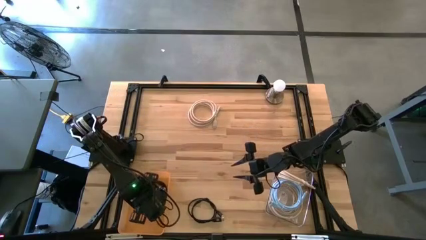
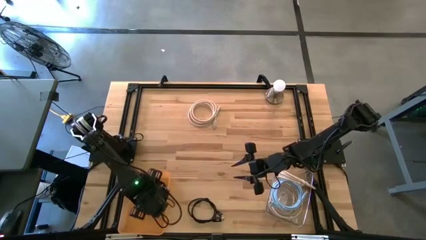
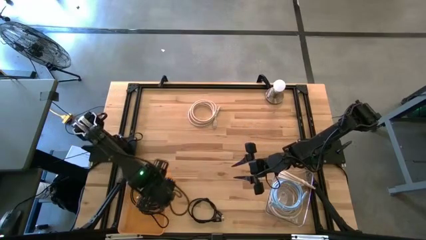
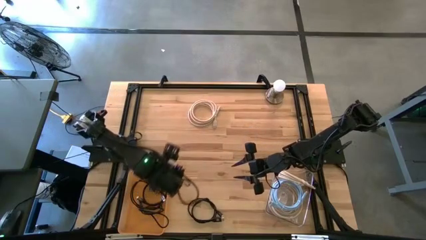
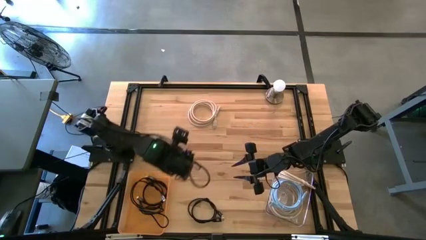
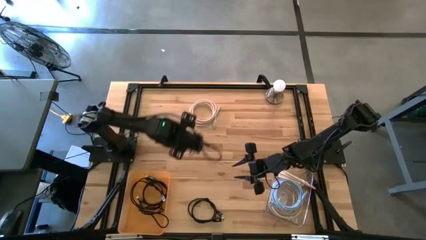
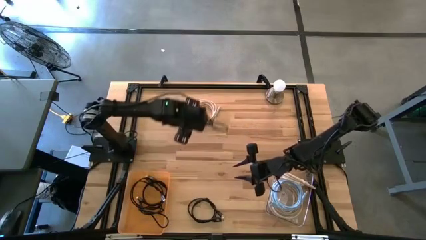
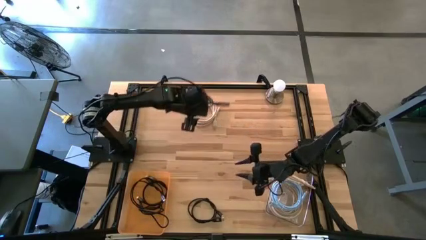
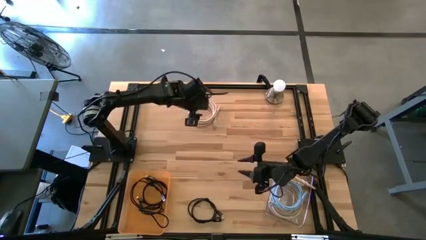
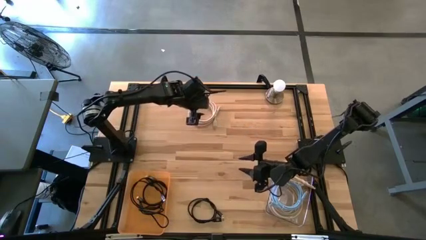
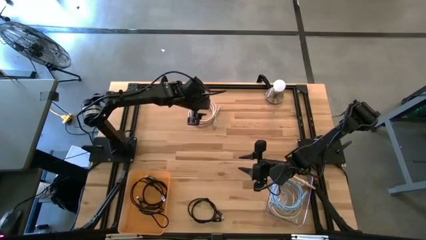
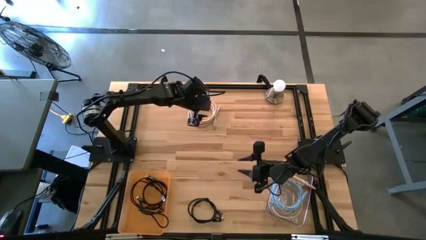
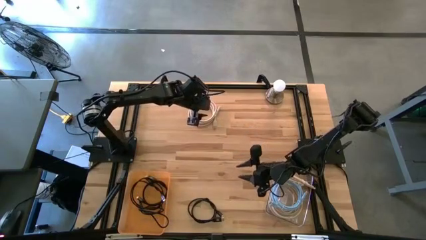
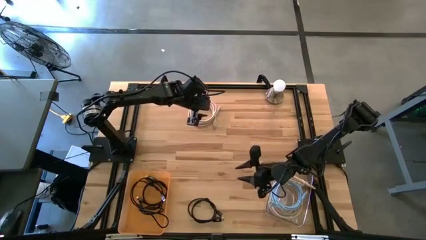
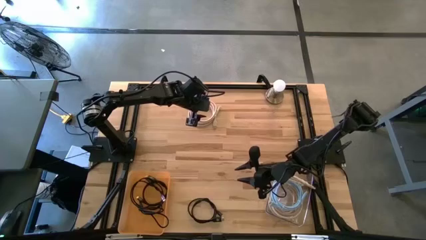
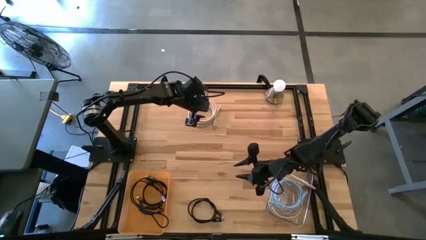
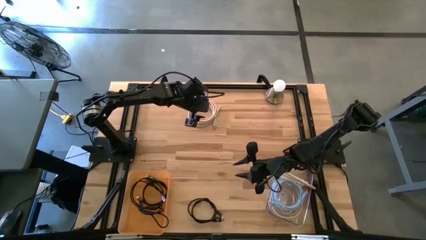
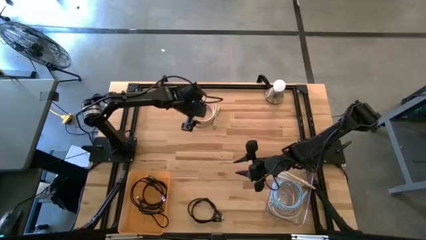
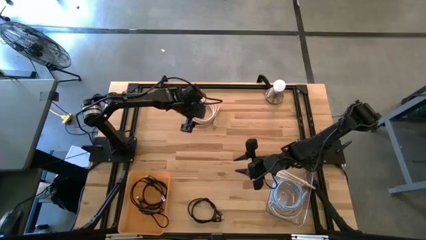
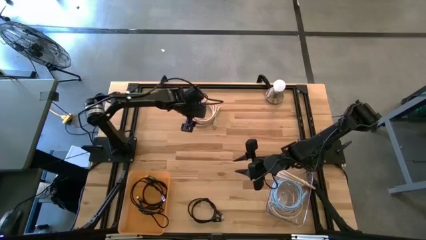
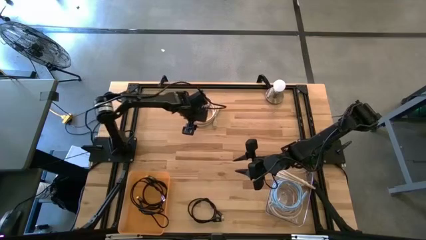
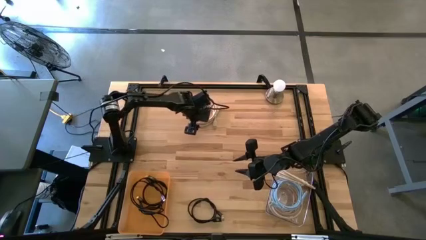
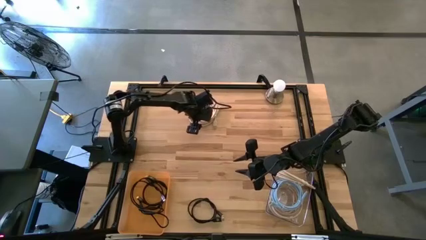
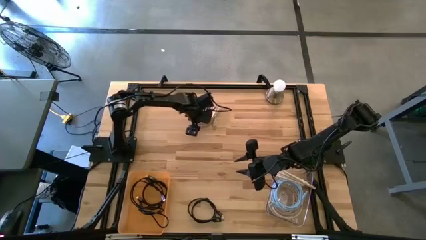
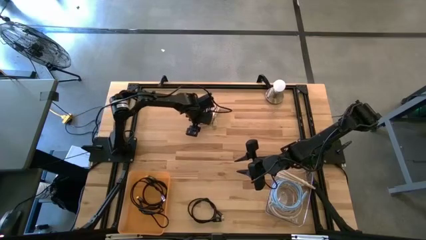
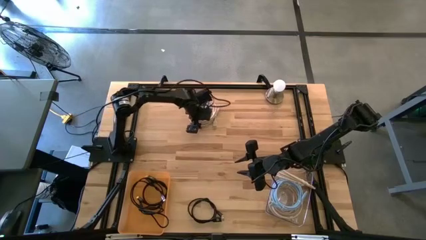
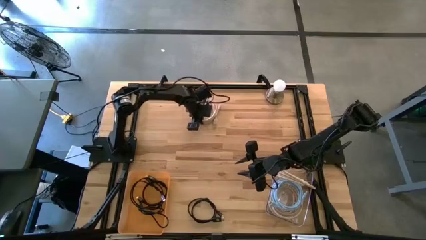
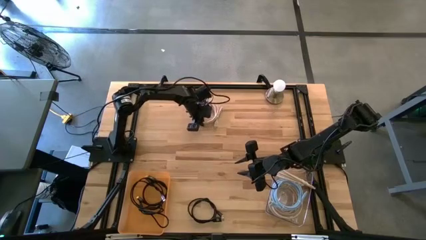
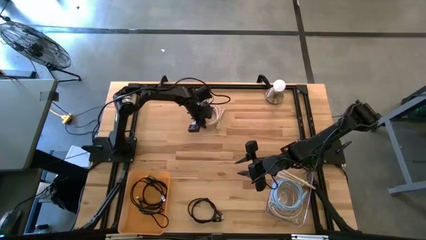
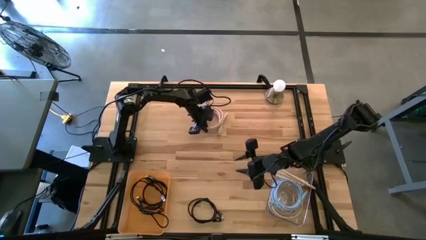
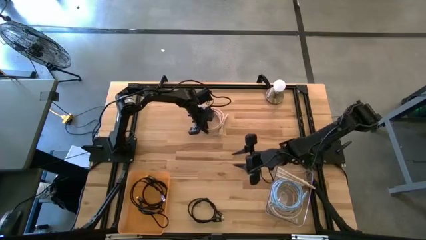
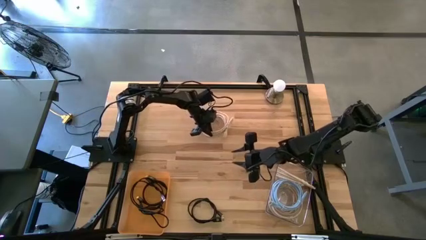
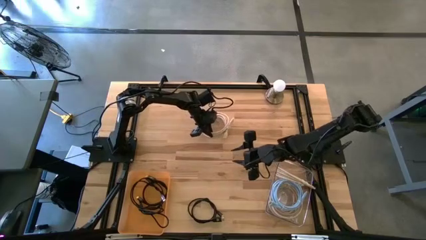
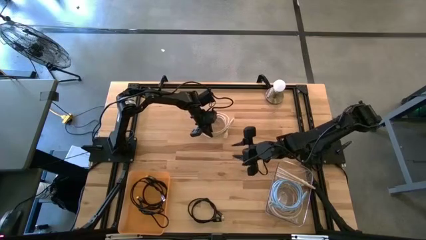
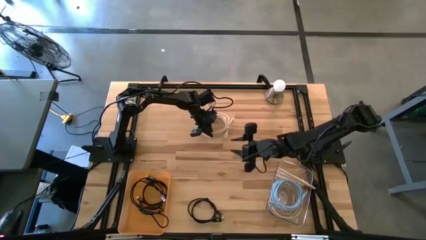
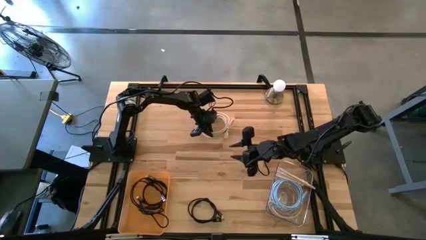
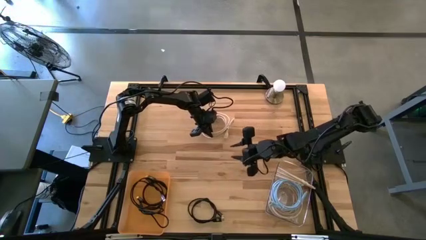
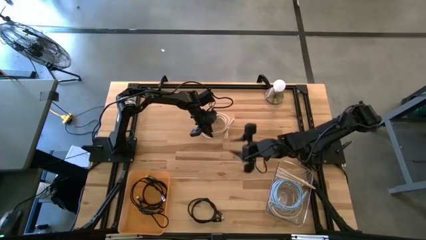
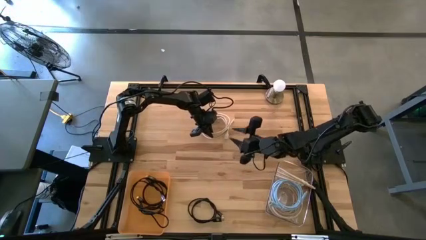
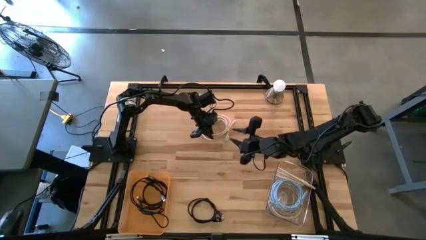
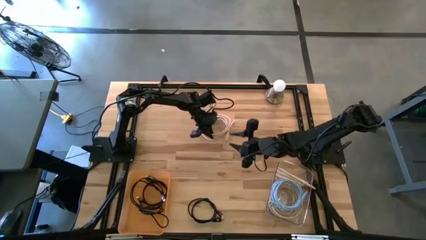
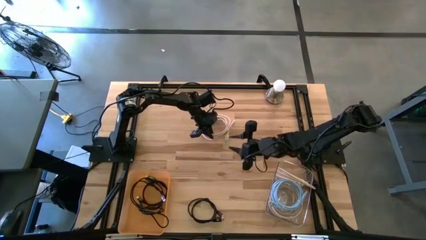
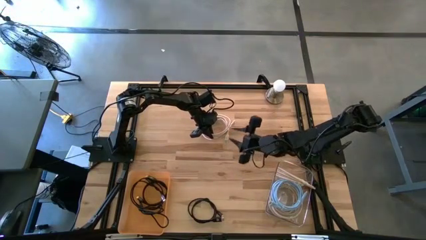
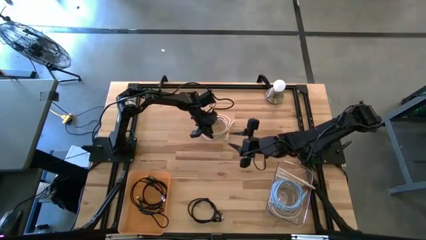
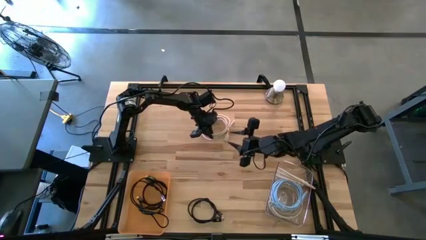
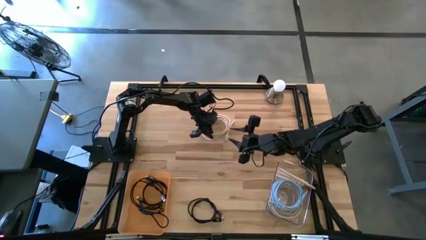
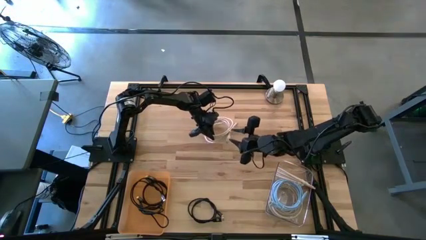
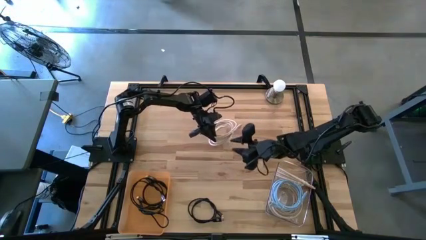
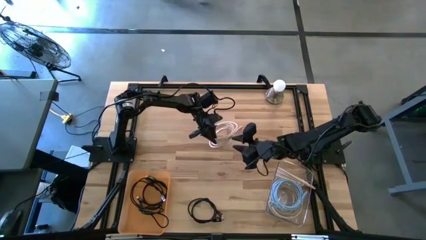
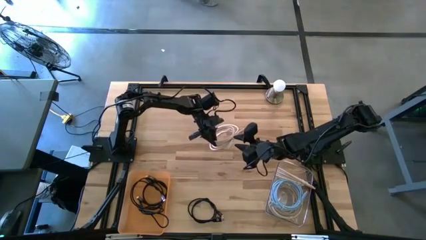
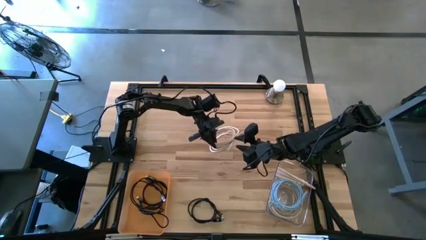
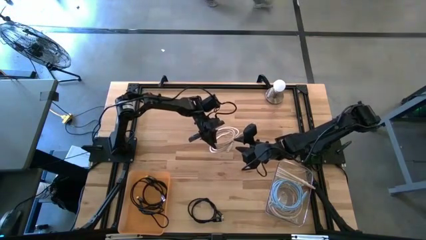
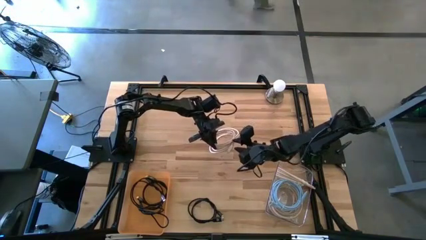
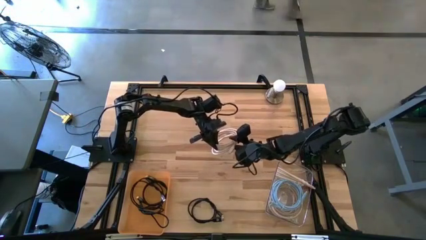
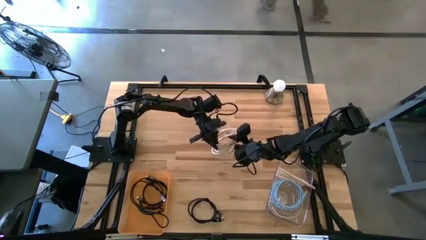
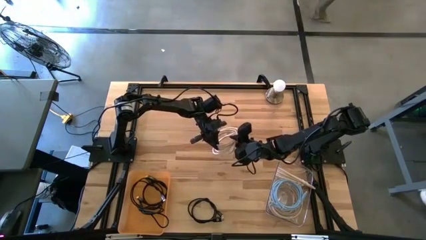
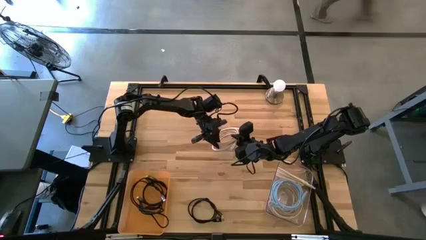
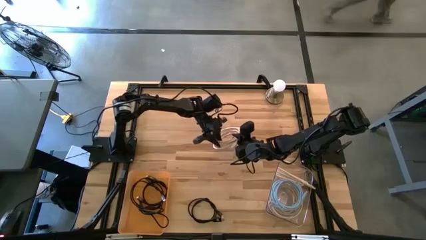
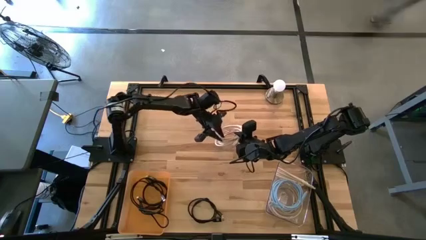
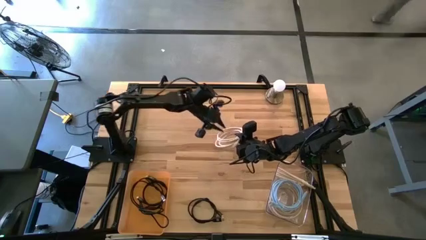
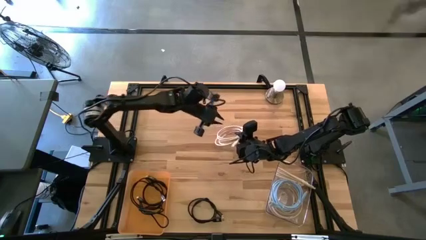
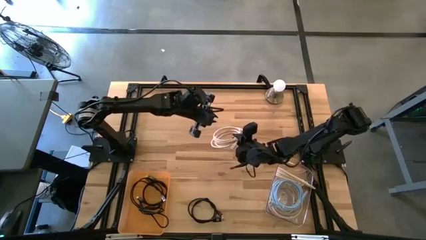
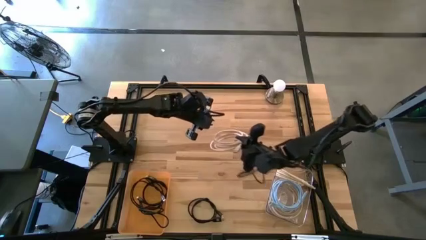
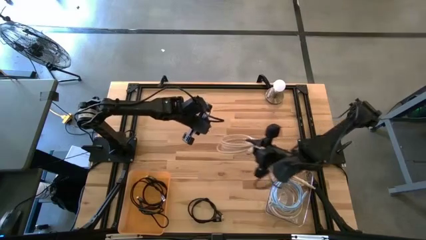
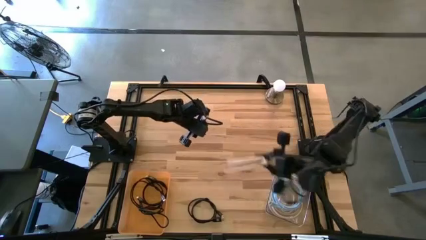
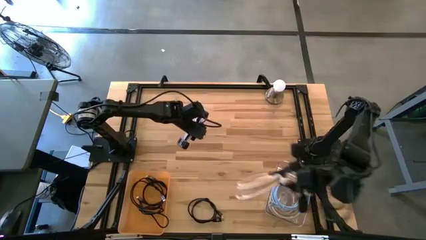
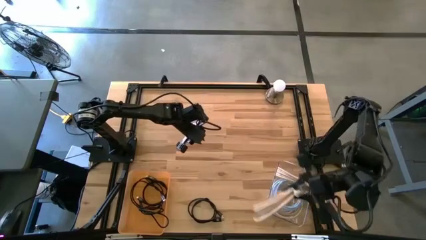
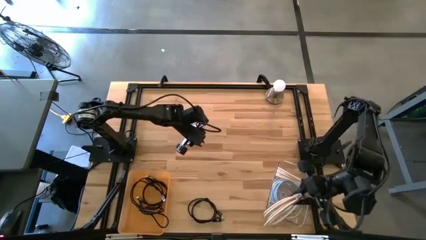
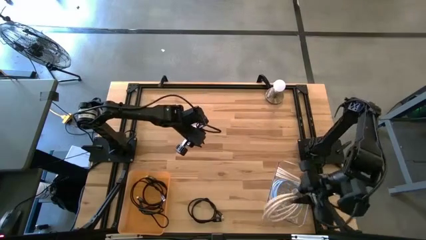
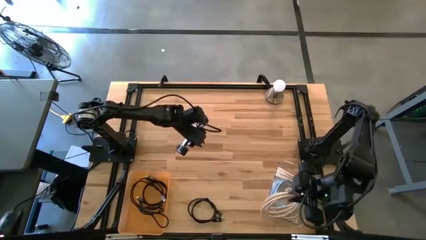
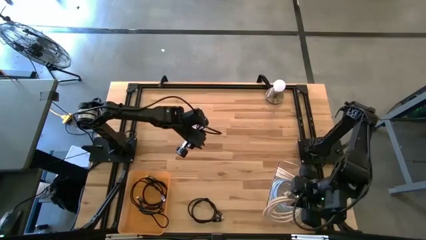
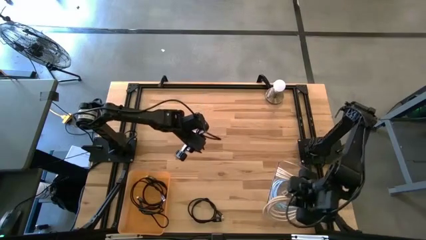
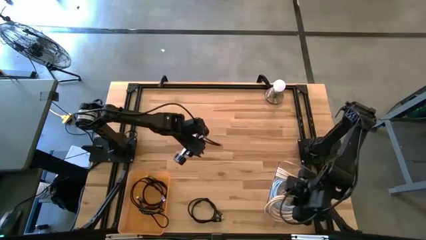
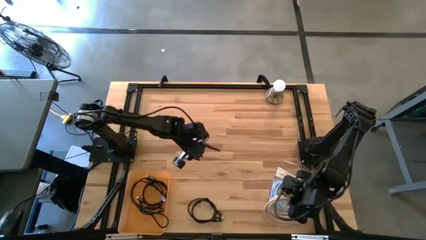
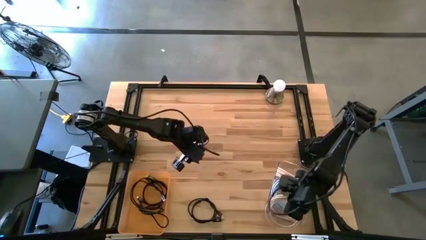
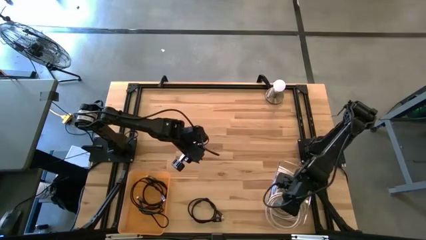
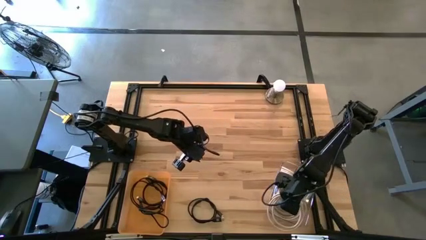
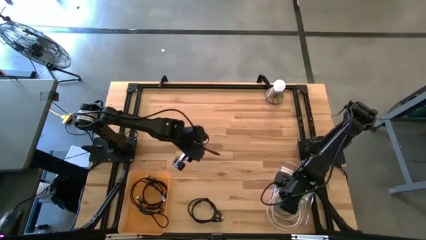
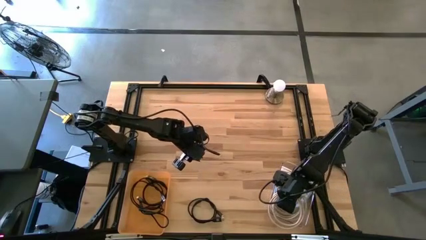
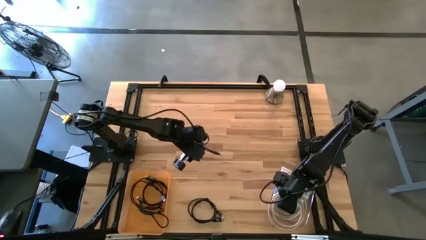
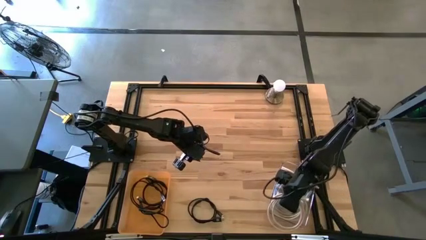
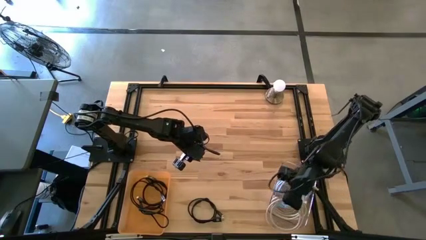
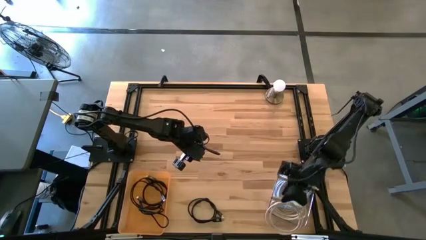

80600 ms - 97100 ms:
Task: Sort HDMI cables
Put the white HDMI cable into the transparent bin
